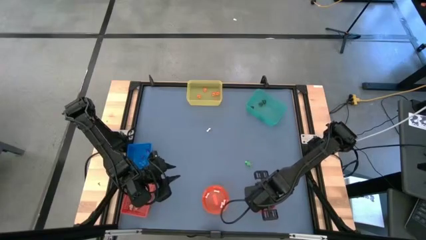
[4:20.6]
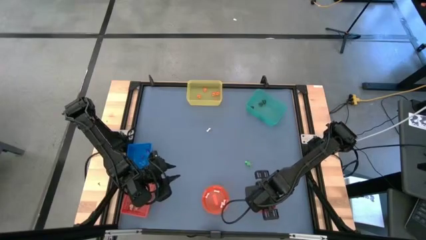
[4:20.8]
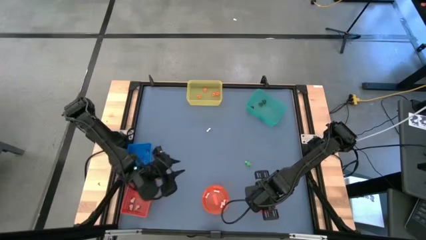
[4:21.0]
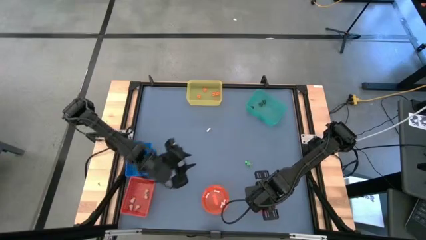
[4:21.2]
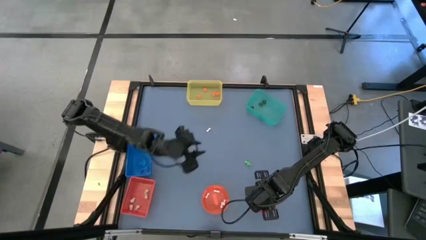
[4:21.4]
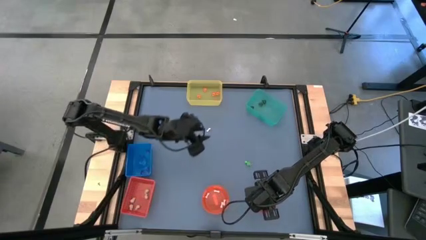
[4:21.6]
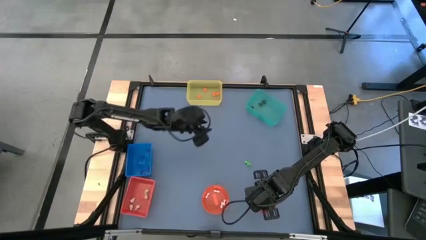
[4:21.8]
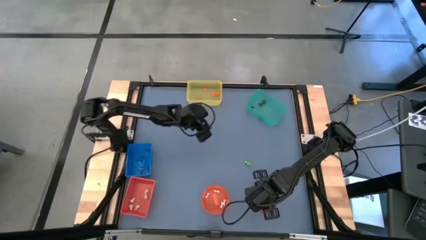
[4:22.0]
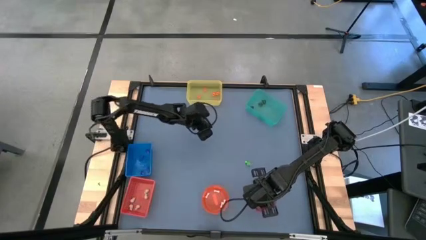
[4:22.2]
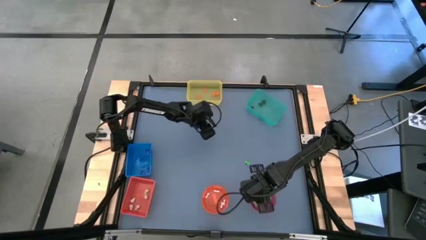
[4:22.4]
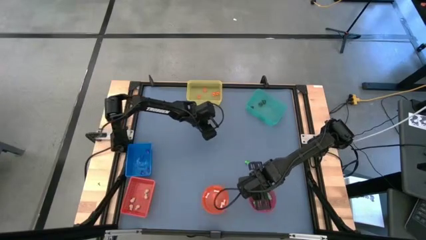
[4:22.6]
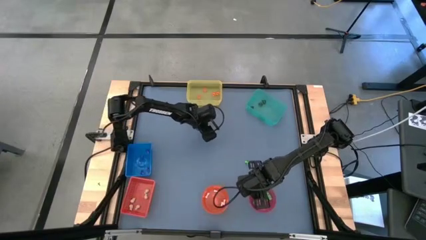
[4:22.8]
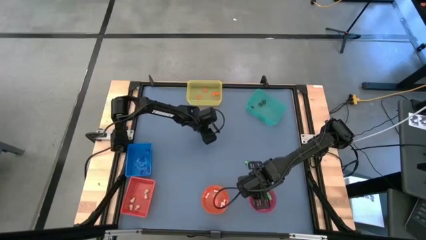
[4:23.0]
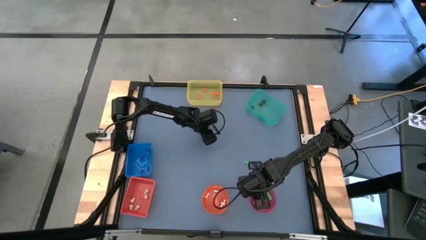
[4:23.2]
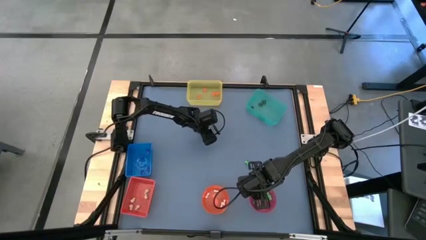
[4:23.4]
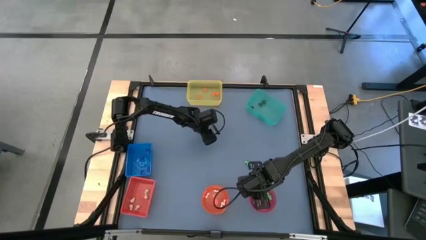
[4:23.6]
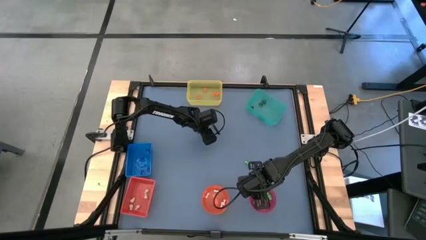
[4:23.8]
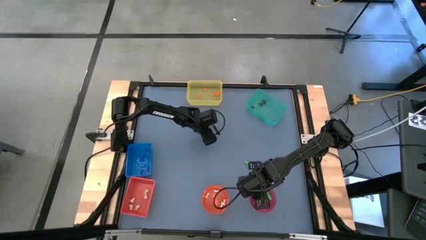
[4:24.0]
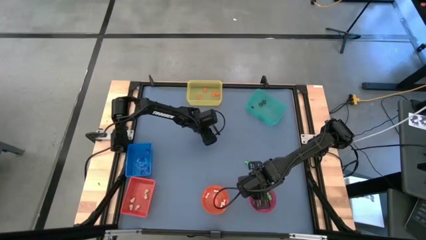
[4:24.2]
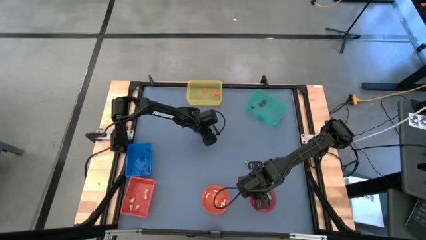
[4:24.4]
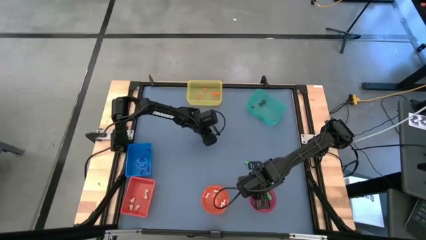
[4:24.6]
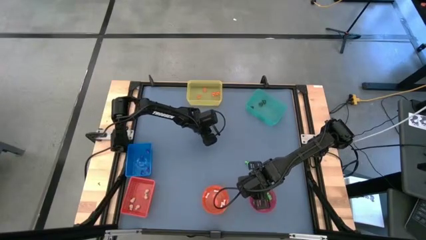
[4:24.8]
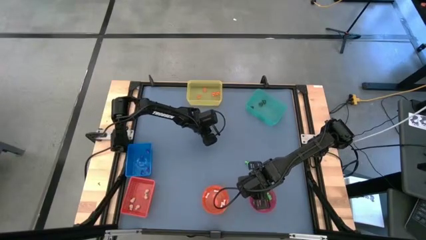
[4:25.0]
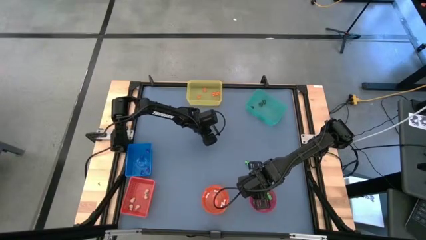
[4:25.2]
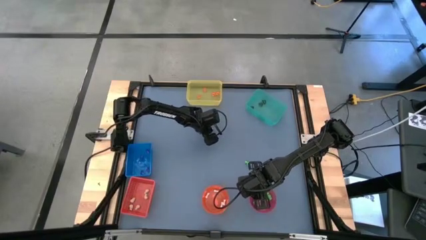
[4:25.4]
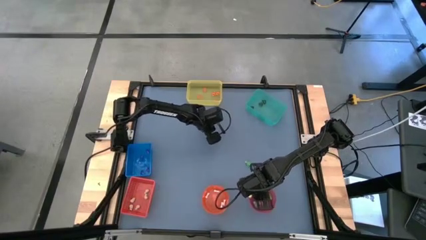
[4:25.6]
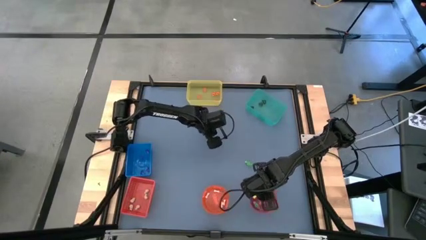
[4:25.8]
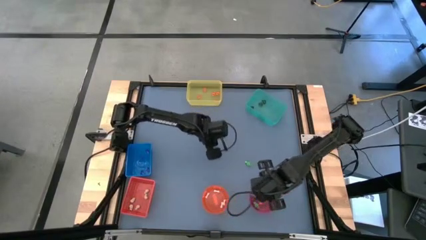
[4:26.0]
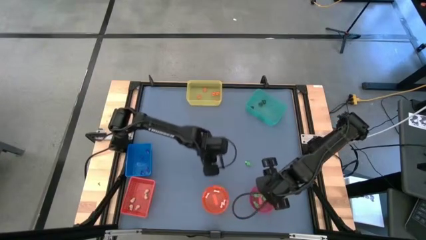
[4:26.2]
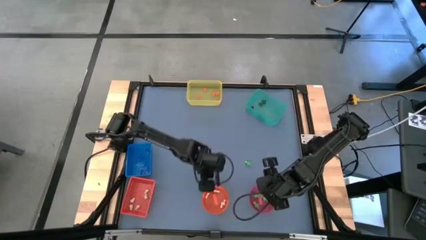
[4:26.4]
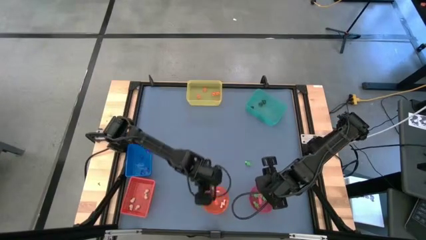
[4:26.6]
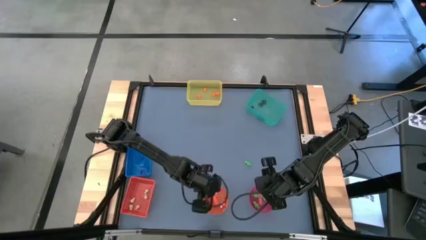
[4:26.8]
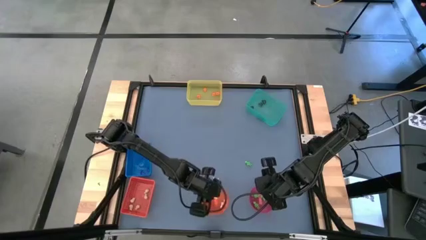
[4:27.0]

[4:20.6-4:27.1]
Task: Sort Halloween decoration
Put the white bone toy into the orange bowl
